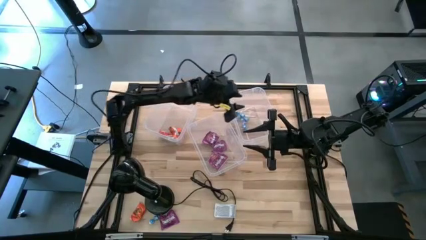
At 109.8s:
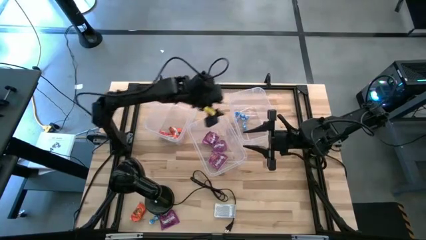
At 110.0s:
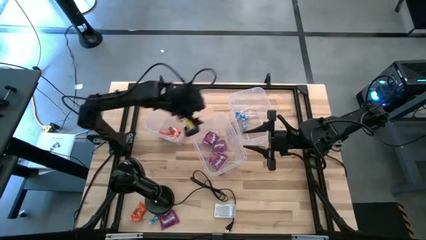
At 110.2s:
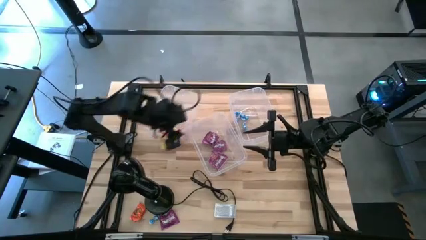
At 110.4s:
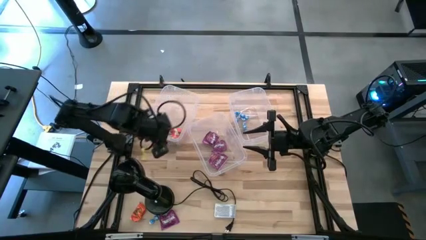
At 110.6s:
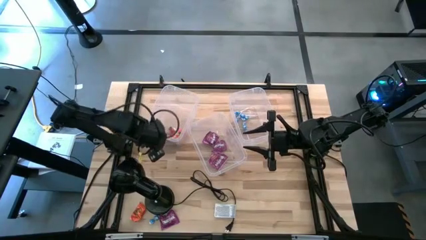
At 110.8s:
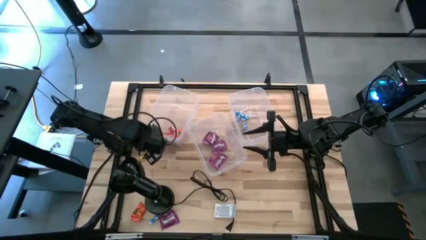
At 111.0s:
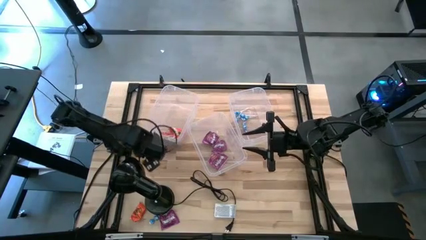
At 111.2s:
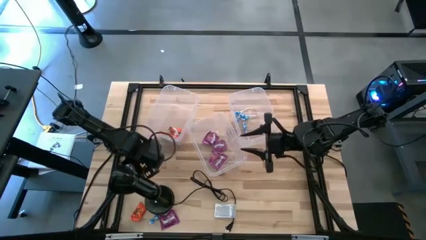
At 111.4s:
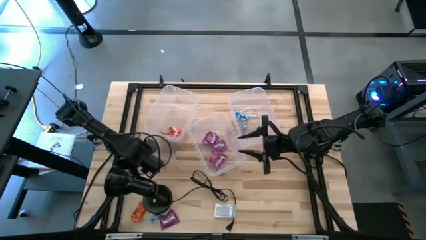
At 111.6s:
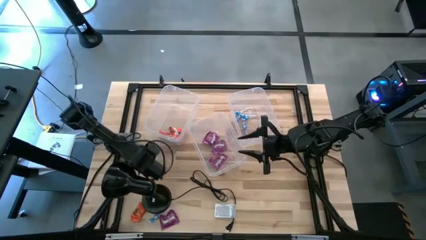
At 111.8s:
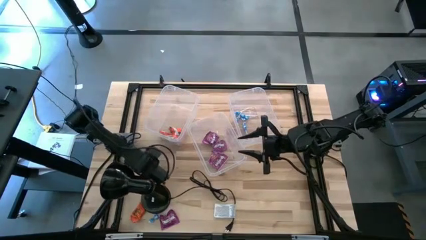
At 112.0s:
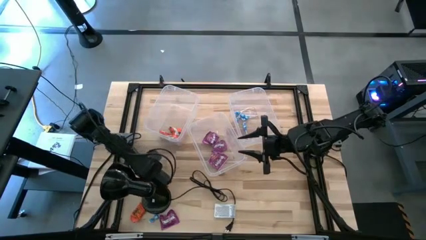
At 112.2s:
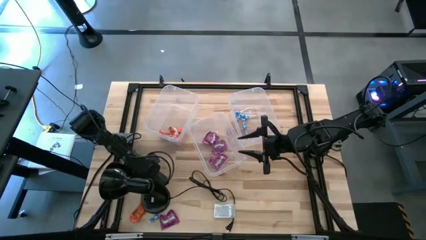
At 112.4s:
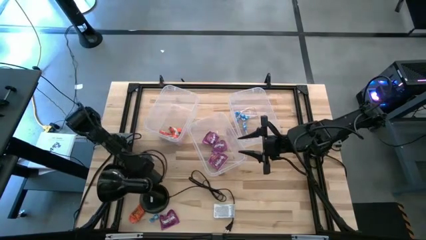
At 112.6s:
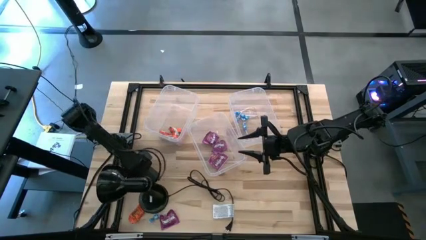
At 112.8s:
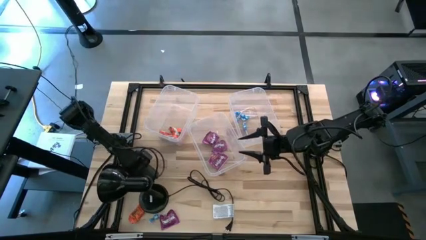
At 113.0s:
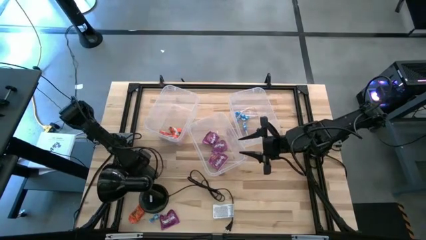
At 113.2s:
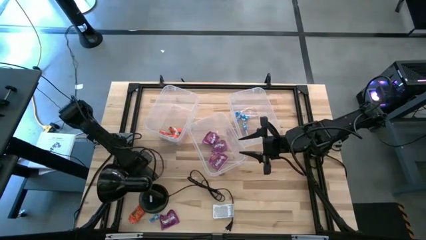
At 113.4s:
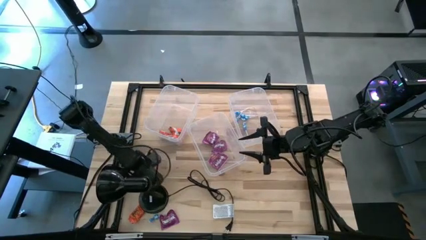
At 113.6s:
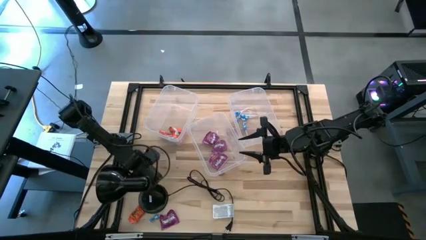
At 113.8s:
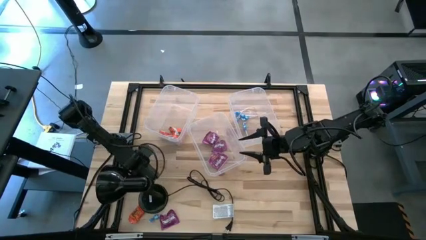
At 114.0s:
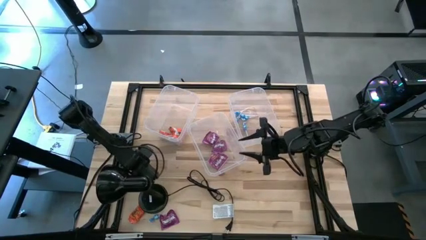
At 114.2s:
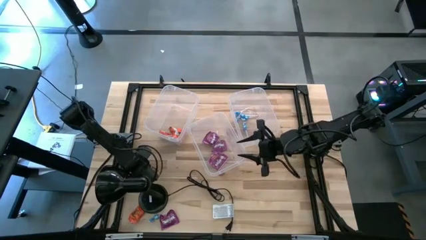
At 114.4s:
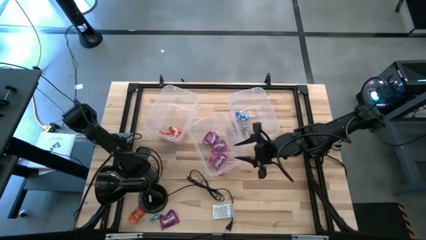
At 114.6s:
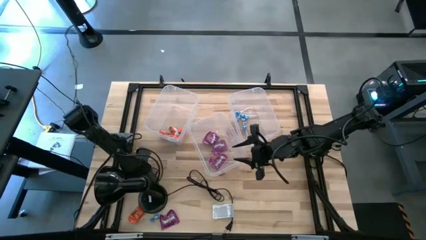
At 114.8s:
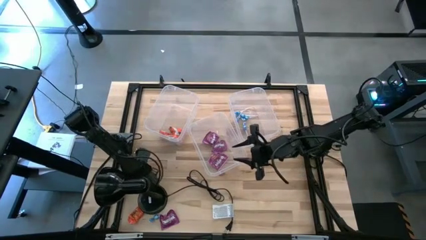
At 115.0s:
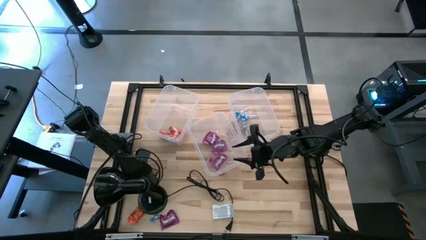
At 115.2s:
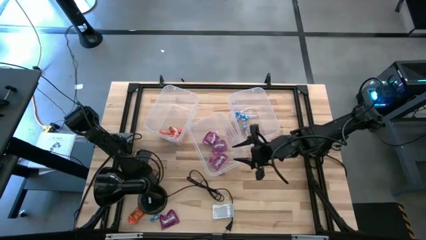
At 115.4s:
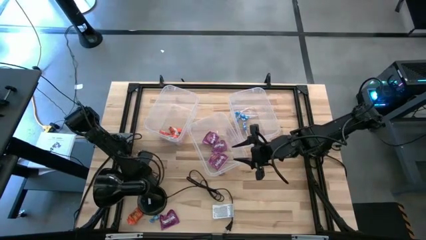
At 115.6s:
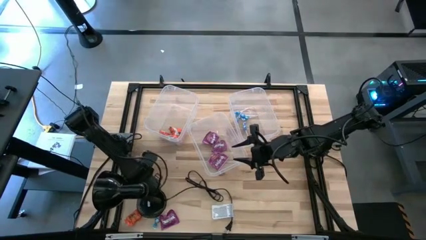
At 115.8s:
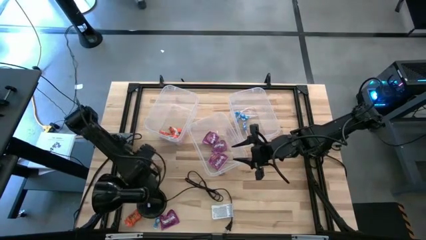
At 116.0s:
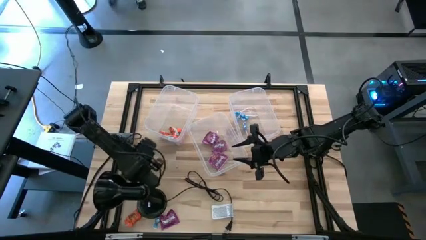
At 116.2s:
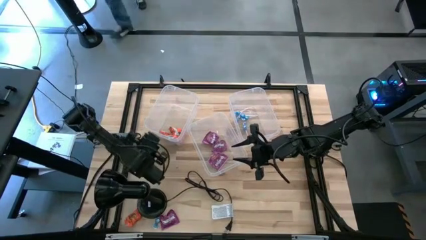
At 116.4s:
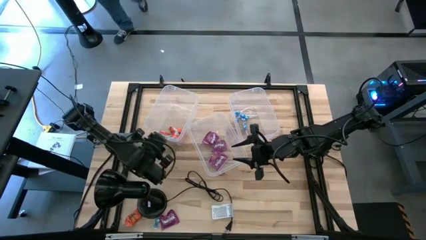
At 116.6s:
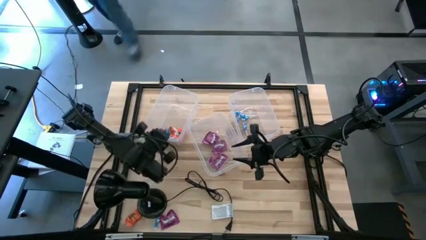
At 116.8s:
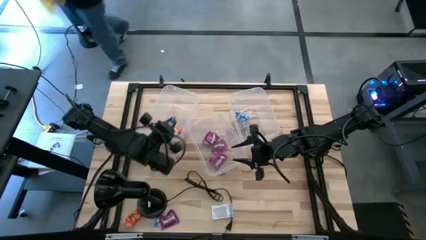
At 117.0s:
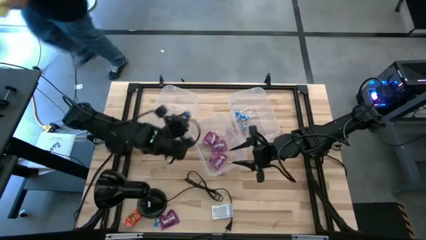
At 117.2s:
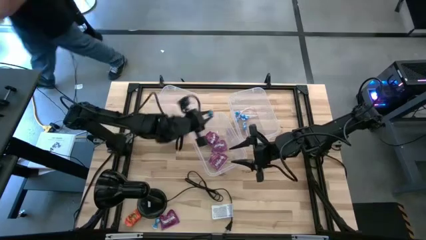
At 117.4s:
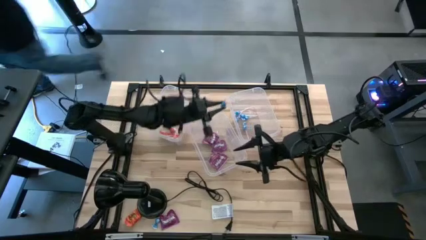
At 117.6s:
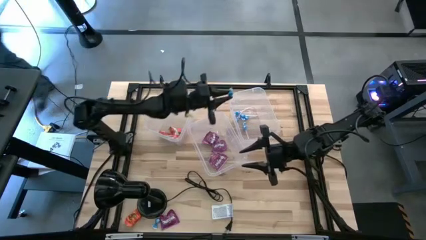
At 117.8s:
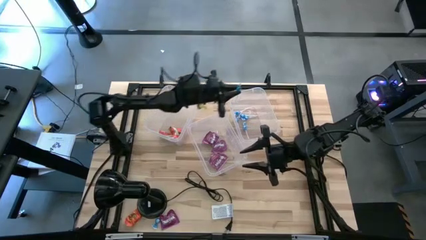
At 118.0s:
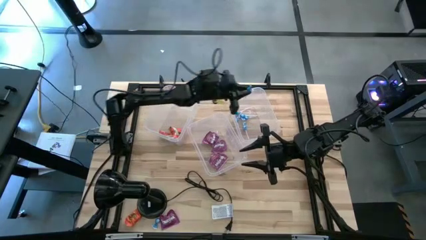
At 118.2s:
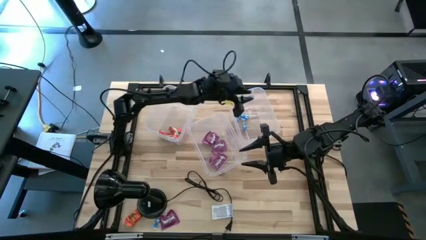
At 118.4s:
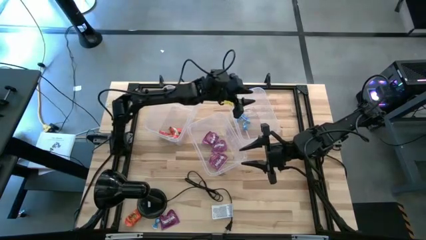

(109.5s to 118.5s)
Task: Sort candy
Put the blue candy into the right transparent bin

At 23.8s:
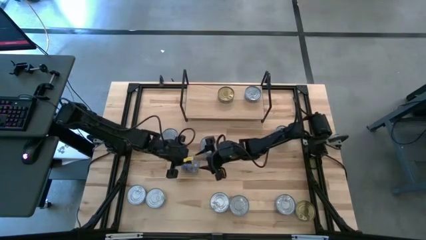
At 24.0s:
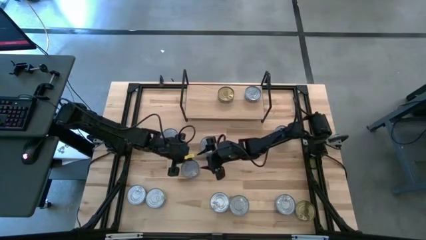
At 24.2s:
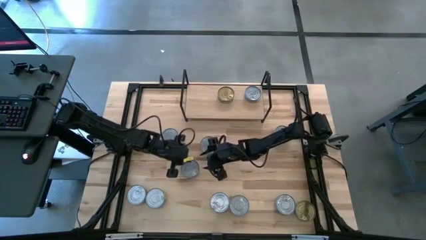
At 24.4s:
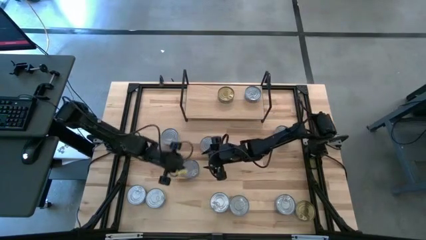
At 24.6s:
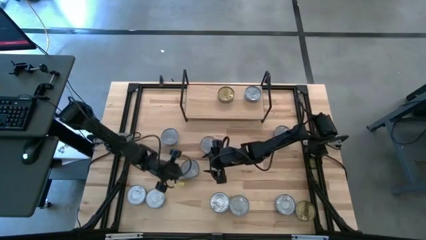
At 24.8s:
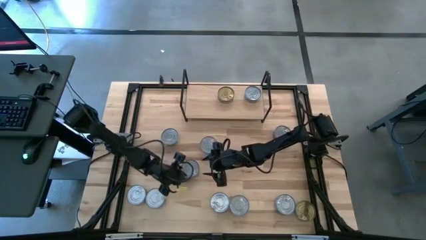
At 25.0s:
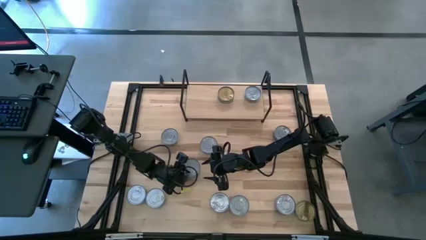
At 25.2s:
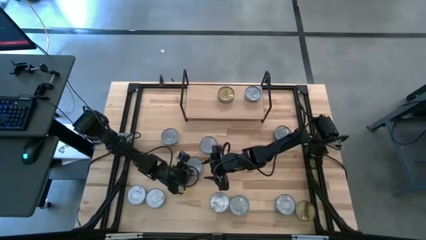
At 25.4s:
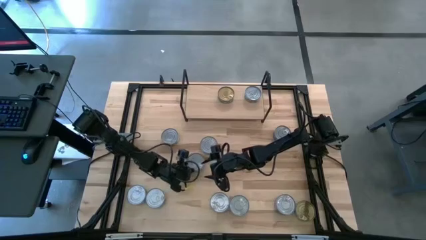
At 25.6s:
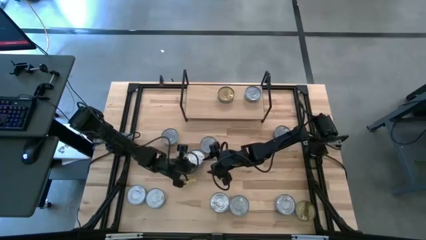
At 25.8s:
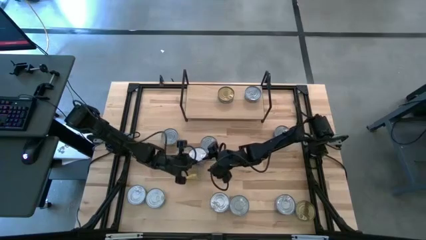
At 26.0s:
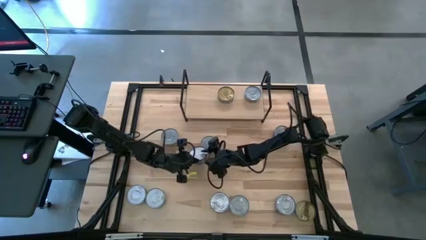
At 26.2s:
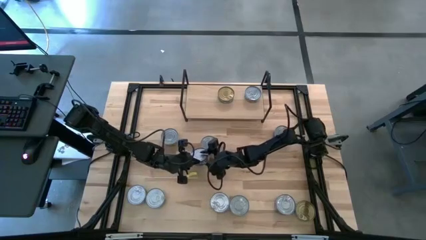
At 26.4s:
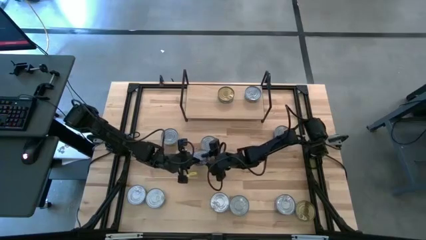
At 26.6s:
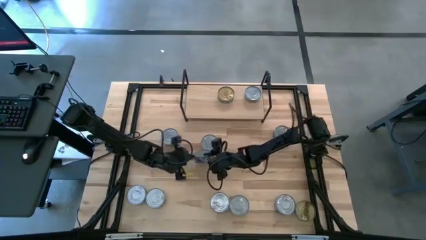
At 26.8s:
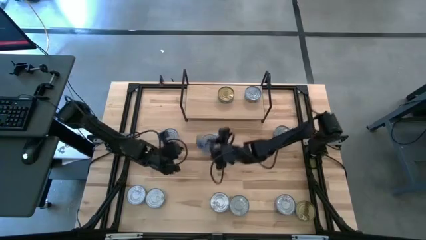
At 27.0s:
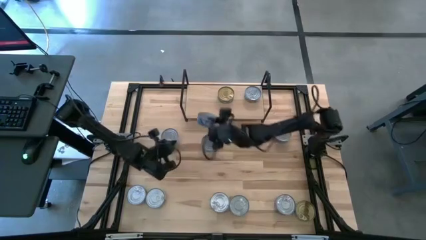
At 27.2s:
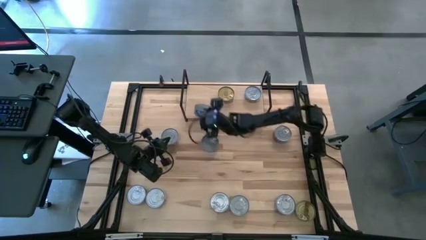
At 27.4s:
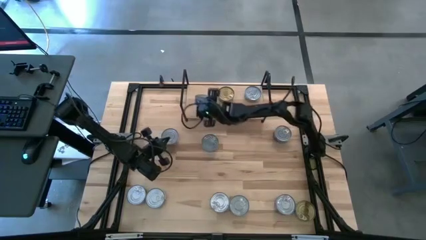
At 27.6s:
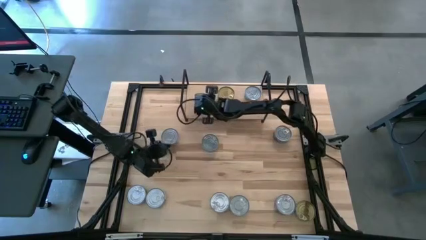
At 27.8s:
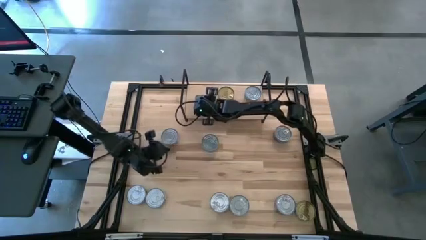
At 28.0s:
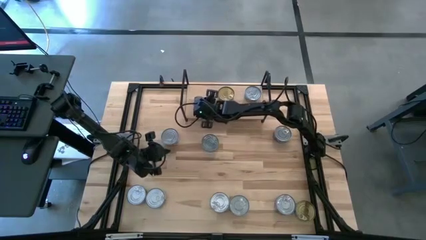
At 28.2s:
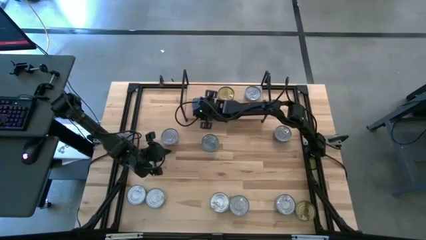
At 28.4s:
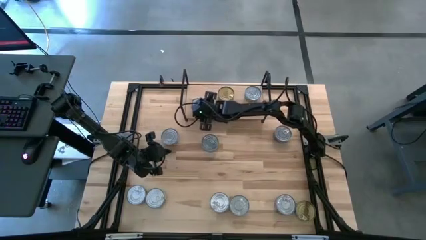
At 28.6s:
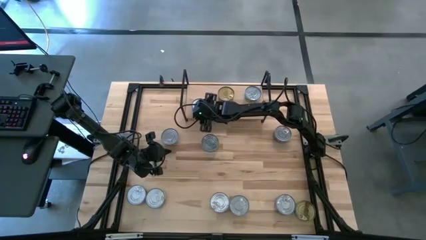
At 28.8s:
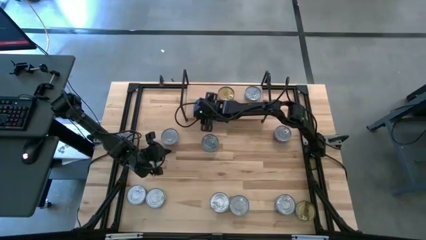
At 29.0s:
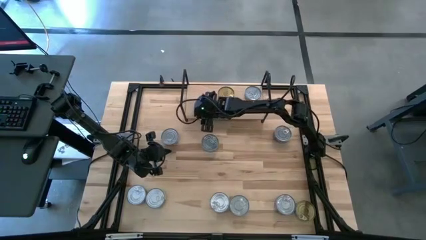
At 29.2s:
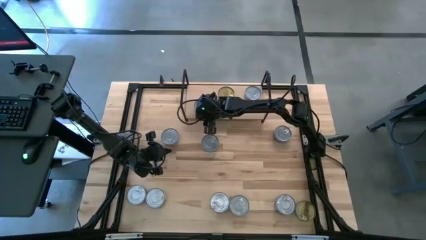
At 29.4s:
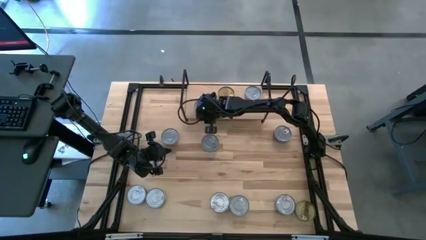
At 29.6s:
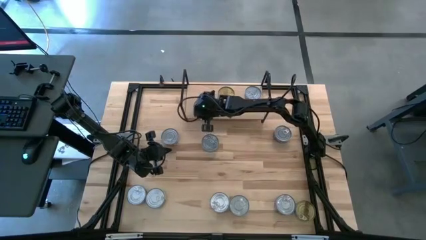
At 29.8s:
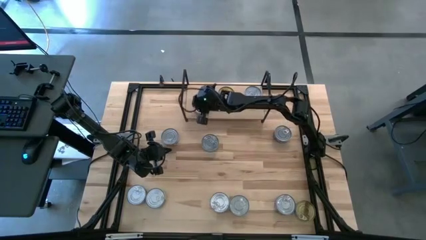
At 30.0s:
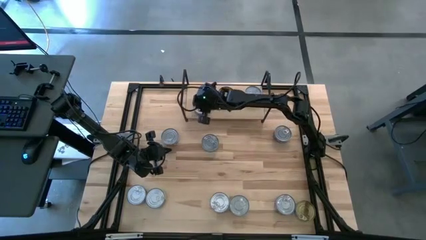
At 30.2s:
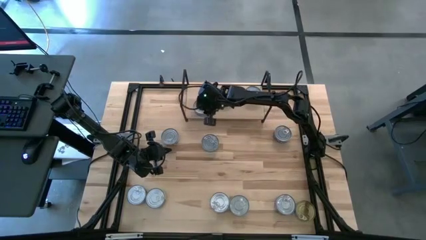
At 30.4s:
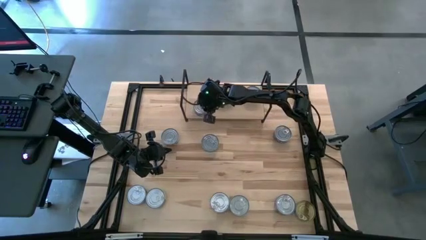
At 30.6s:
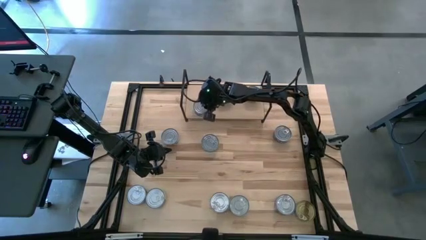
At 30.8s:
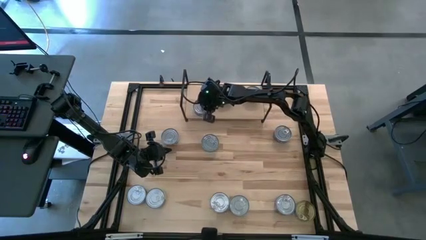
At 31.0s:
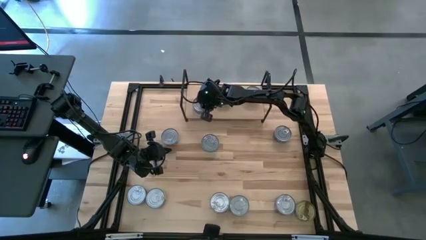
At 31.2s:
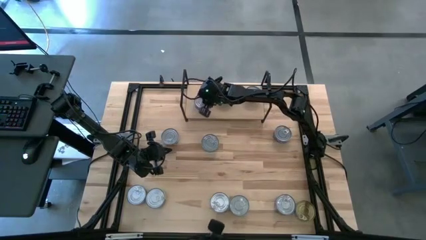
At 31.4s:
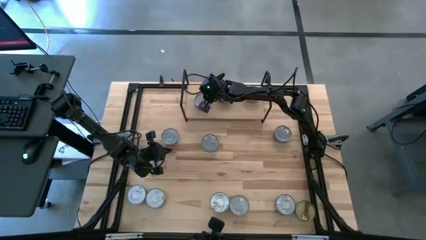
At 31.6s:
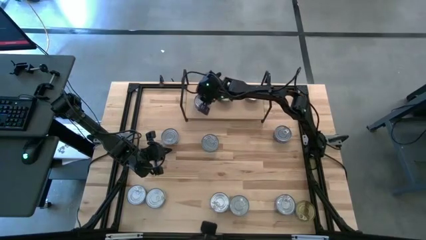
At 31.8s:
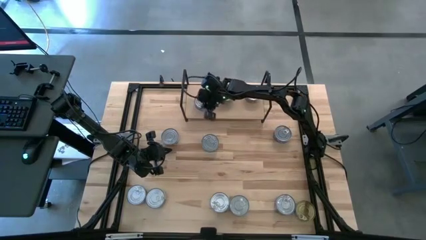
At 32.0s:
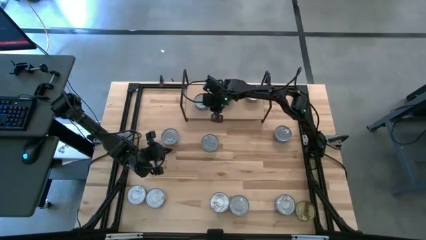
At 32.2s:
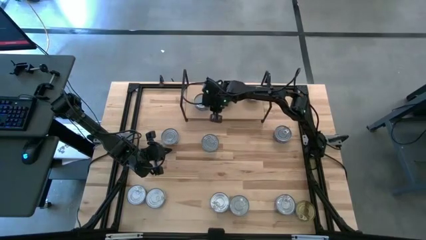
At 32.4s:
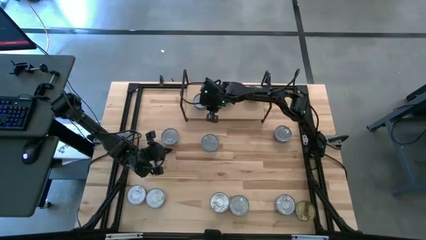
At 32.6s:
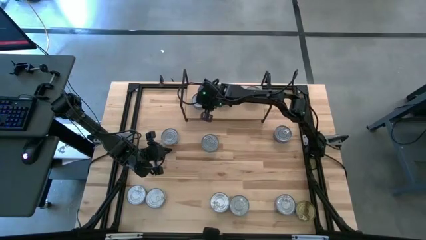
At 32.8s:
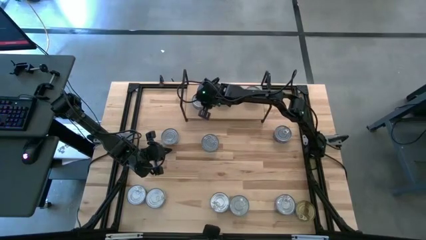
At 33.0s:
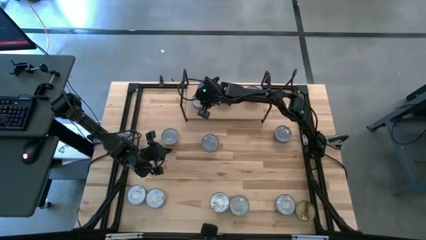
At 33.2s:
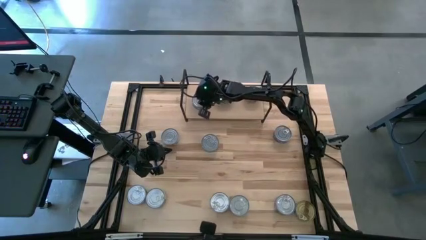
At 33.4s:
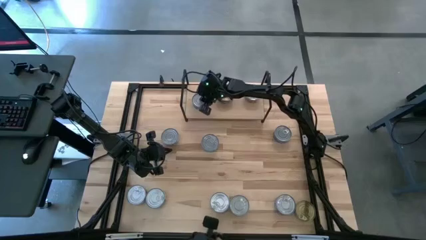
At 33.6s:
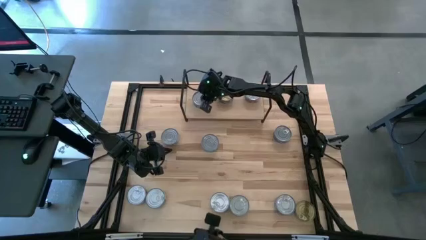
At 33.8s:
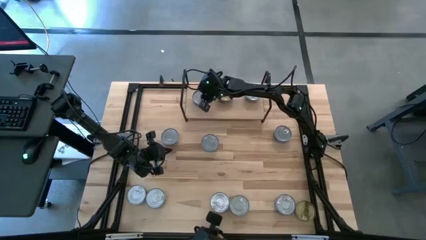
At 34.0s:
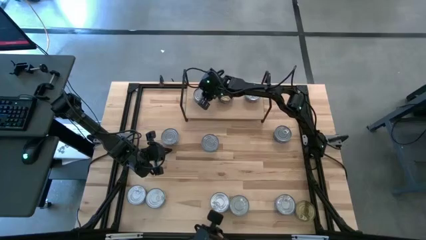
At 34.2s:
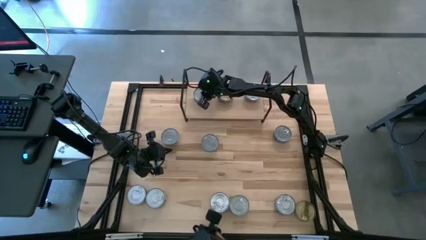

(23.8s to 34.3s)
Task: Stack canned seafood by type on shelf
Put the top left blue tuna can on the shelf
